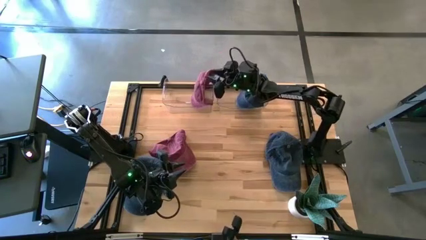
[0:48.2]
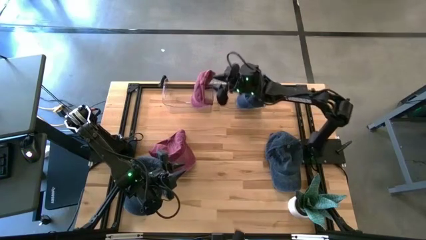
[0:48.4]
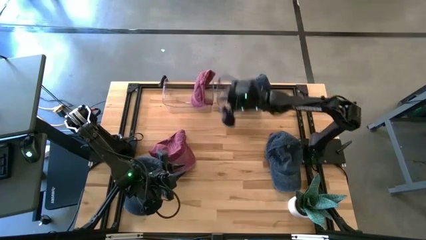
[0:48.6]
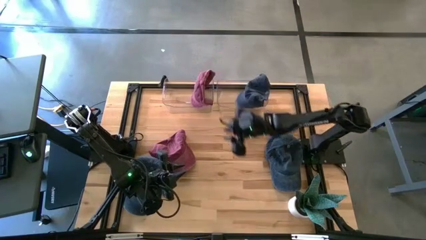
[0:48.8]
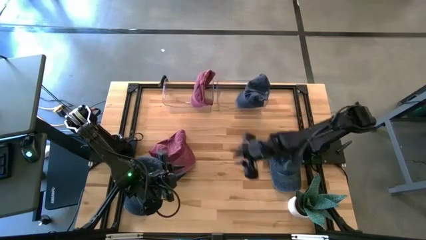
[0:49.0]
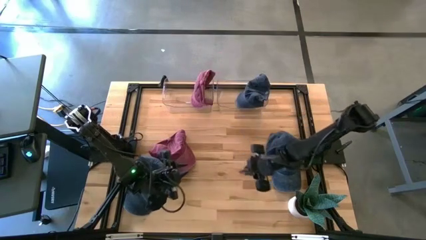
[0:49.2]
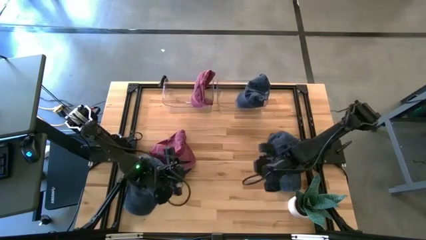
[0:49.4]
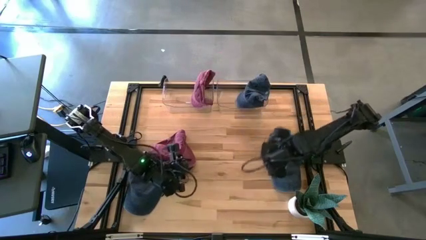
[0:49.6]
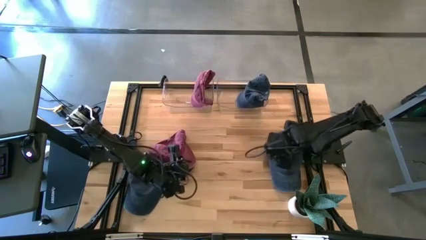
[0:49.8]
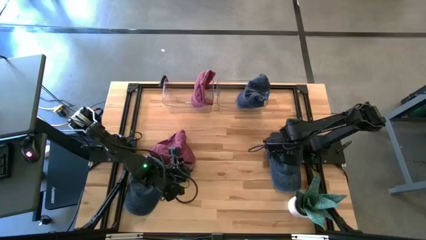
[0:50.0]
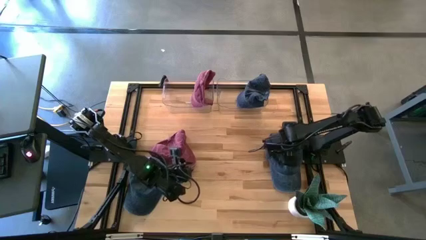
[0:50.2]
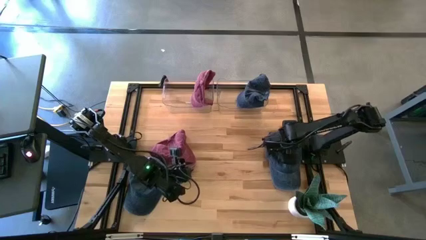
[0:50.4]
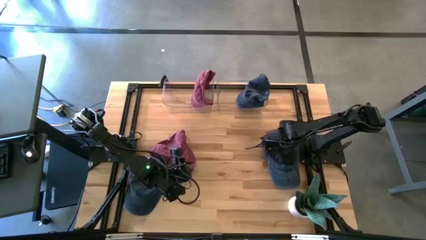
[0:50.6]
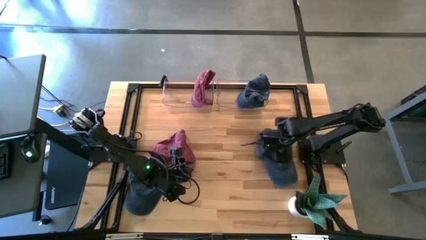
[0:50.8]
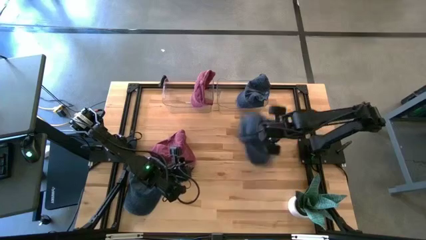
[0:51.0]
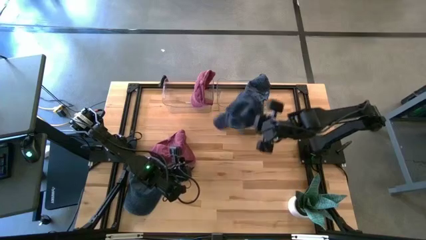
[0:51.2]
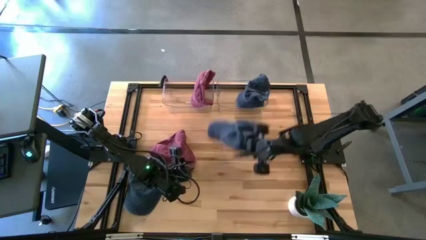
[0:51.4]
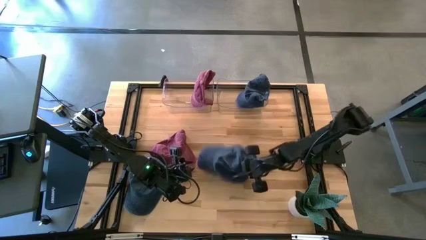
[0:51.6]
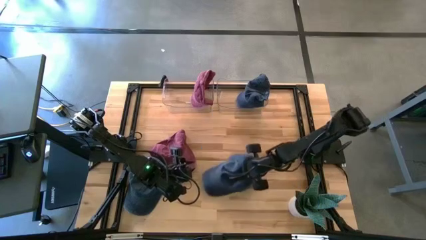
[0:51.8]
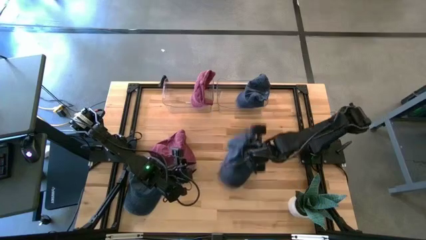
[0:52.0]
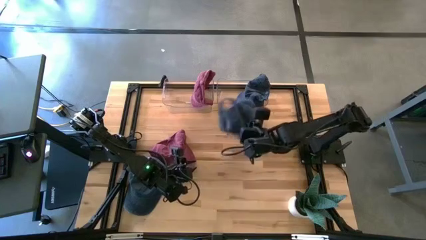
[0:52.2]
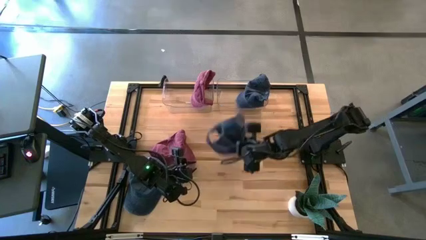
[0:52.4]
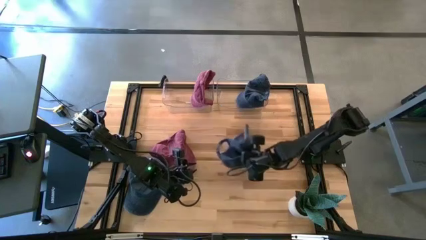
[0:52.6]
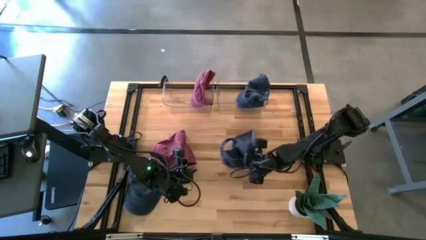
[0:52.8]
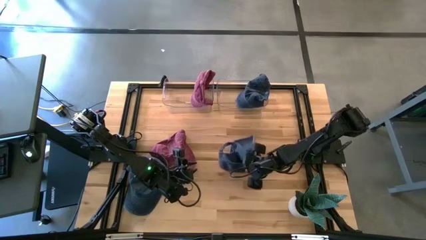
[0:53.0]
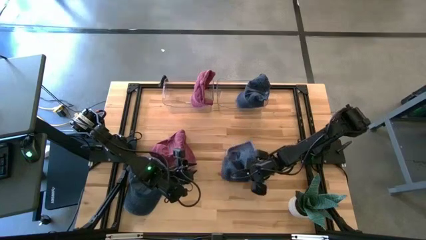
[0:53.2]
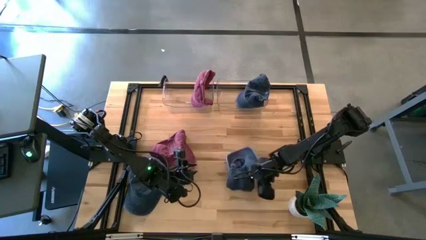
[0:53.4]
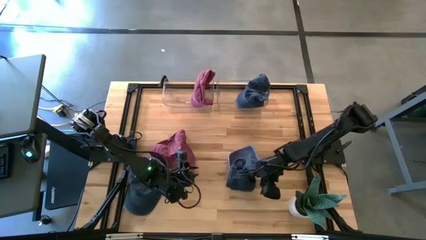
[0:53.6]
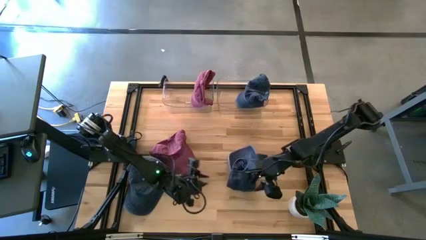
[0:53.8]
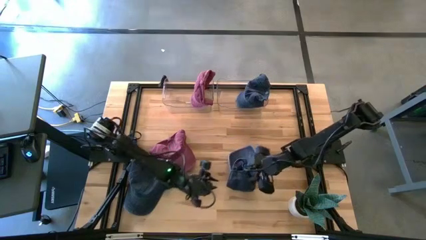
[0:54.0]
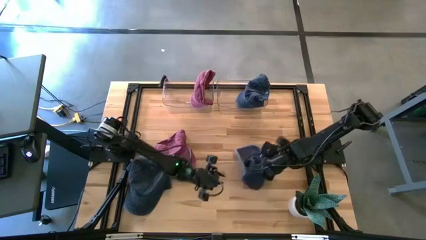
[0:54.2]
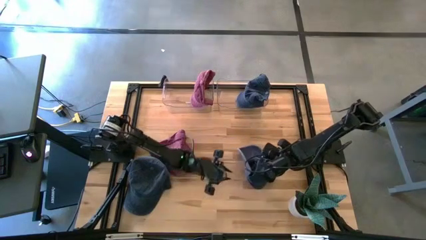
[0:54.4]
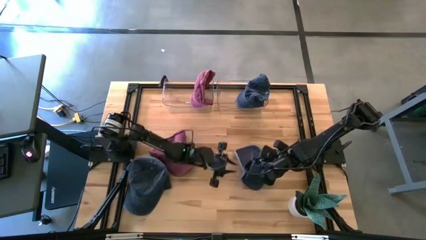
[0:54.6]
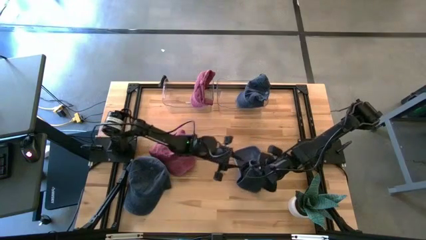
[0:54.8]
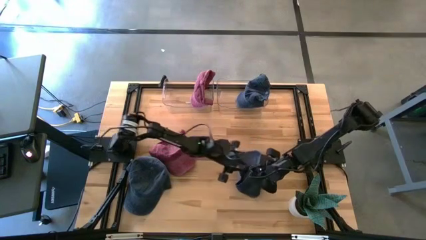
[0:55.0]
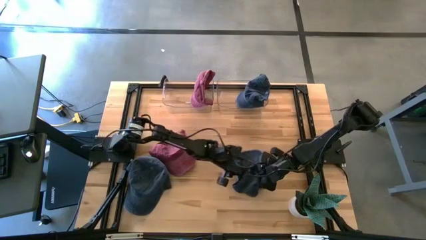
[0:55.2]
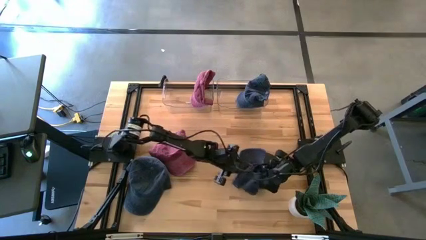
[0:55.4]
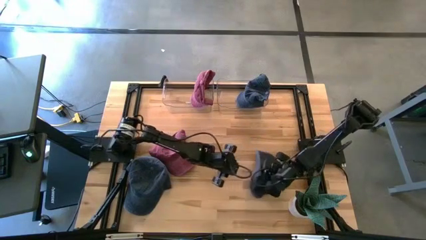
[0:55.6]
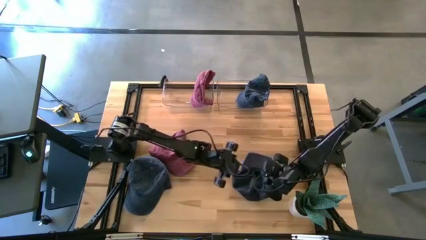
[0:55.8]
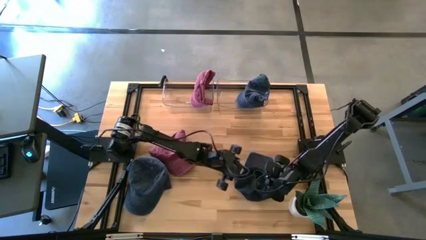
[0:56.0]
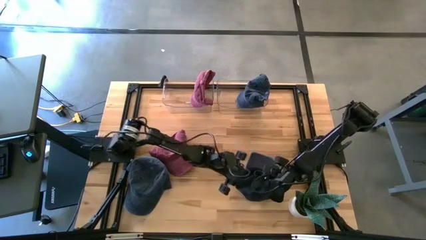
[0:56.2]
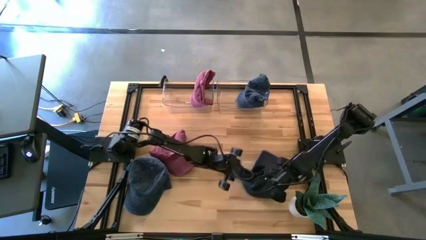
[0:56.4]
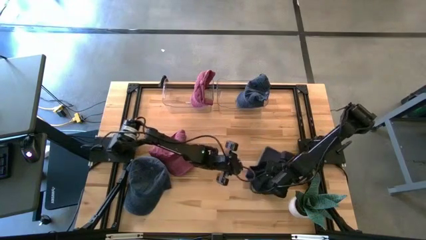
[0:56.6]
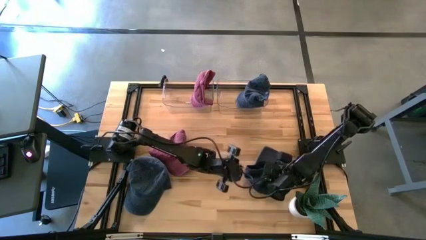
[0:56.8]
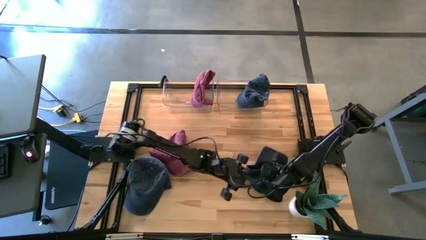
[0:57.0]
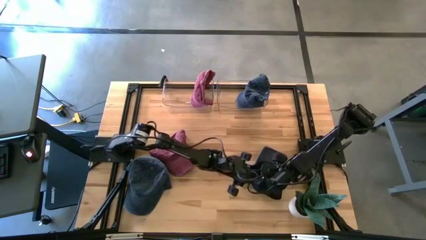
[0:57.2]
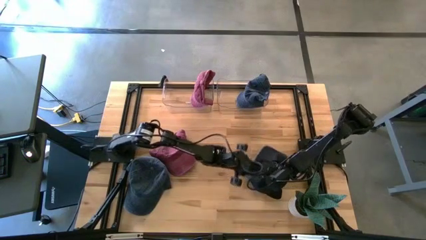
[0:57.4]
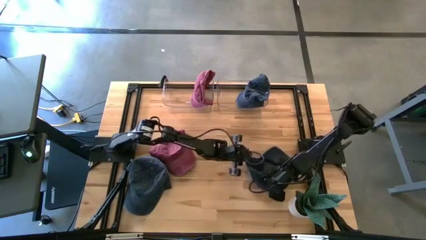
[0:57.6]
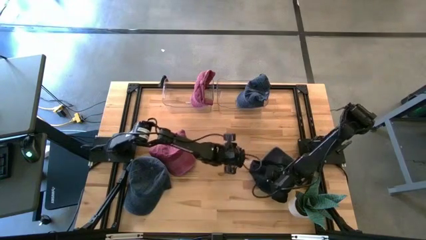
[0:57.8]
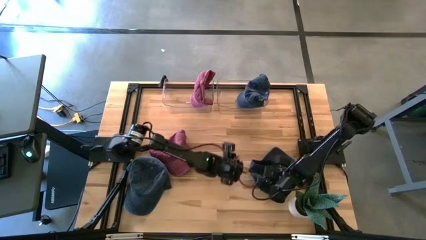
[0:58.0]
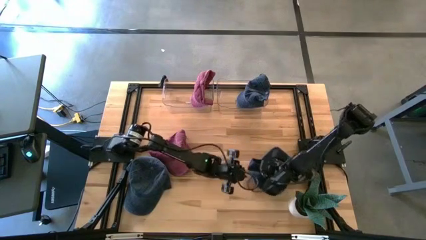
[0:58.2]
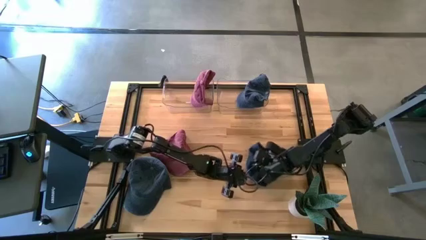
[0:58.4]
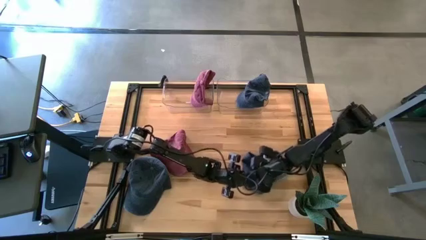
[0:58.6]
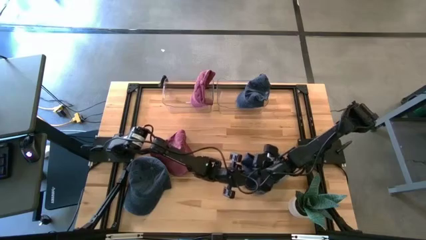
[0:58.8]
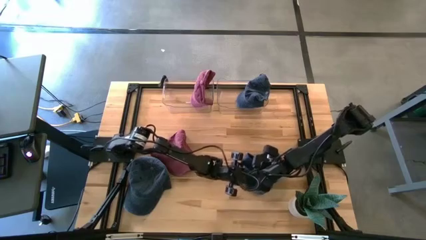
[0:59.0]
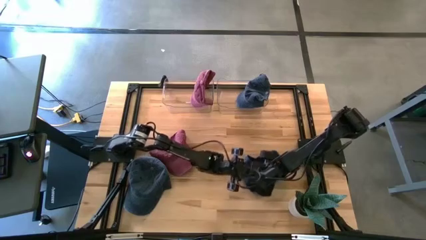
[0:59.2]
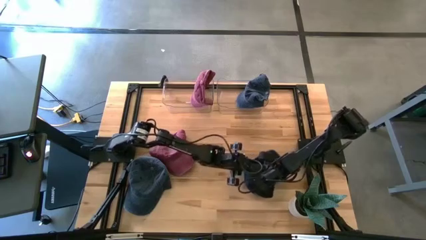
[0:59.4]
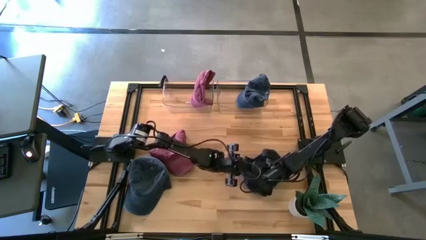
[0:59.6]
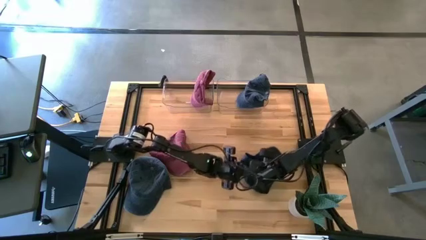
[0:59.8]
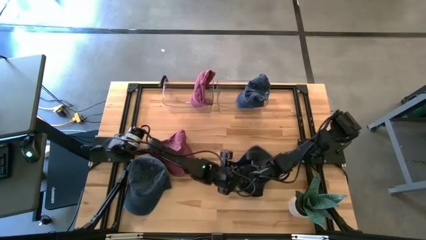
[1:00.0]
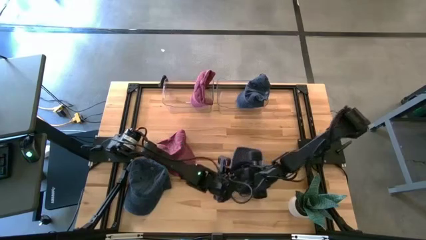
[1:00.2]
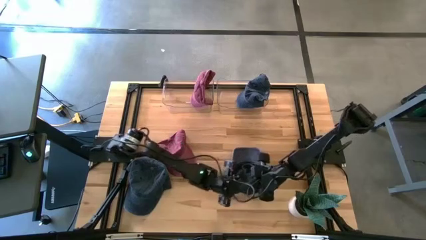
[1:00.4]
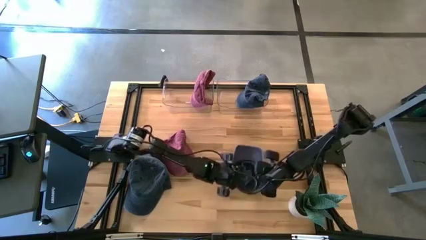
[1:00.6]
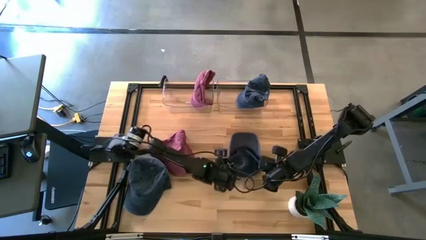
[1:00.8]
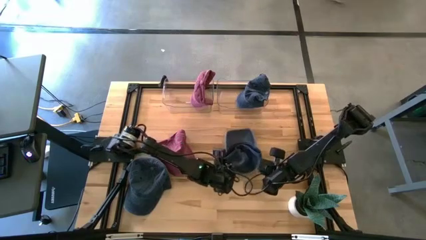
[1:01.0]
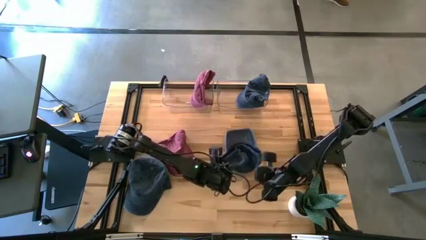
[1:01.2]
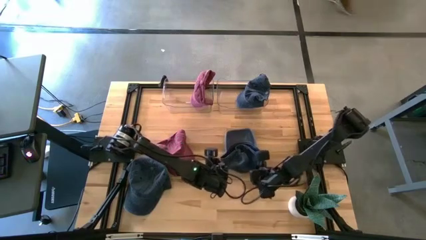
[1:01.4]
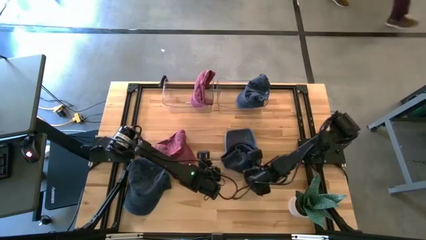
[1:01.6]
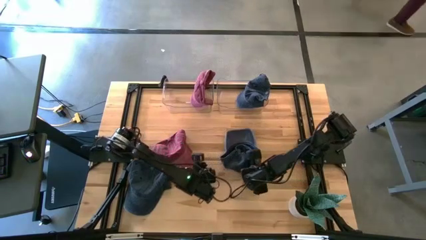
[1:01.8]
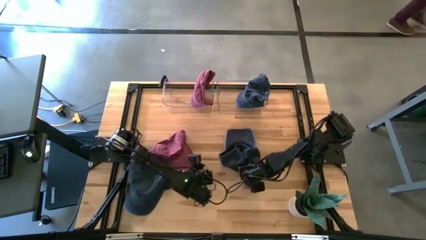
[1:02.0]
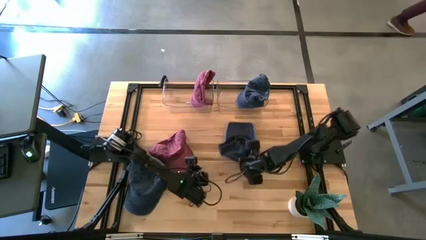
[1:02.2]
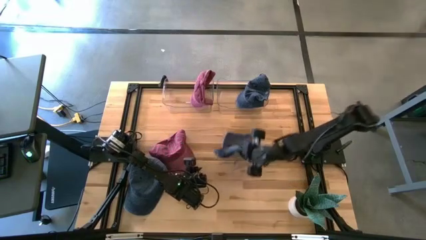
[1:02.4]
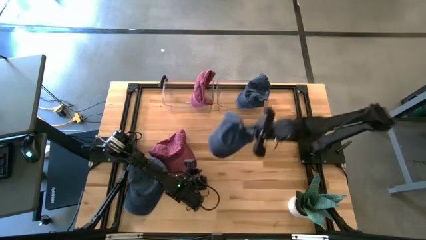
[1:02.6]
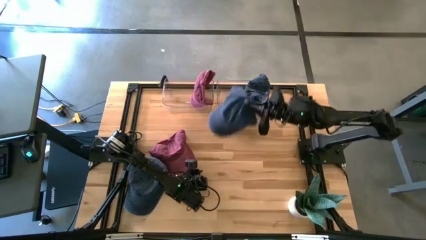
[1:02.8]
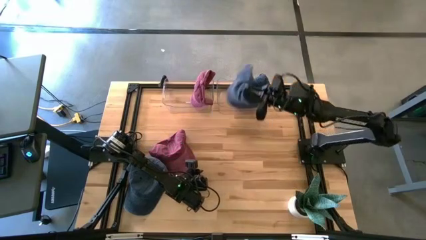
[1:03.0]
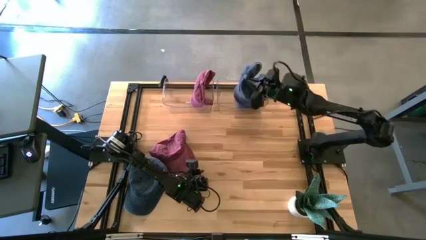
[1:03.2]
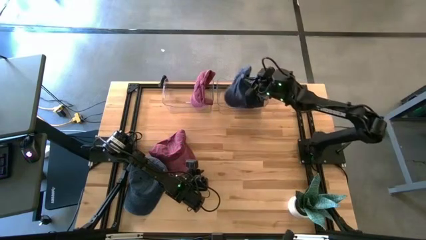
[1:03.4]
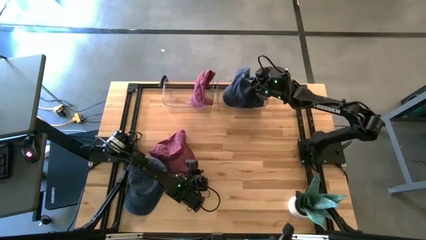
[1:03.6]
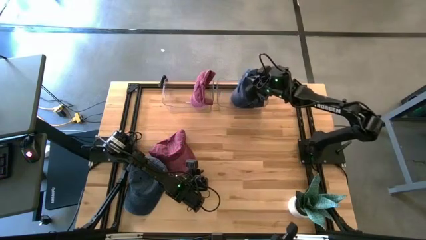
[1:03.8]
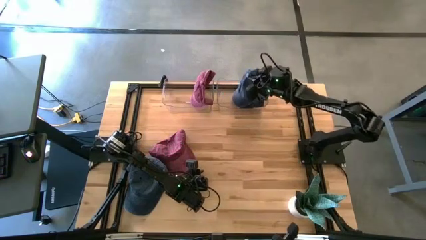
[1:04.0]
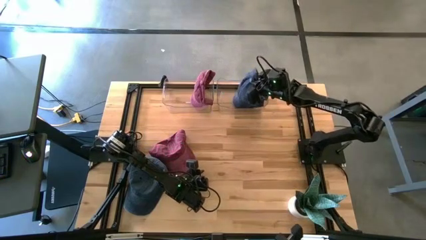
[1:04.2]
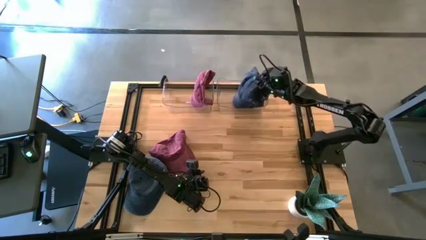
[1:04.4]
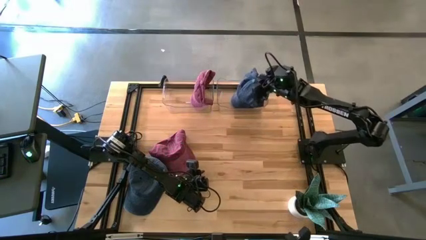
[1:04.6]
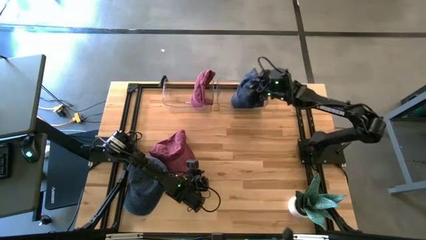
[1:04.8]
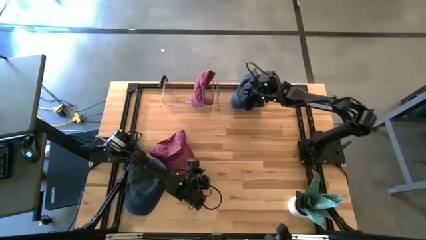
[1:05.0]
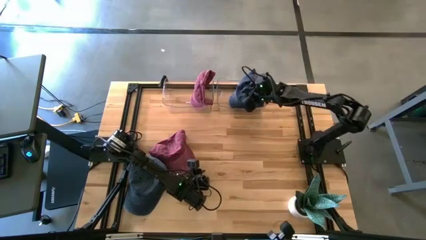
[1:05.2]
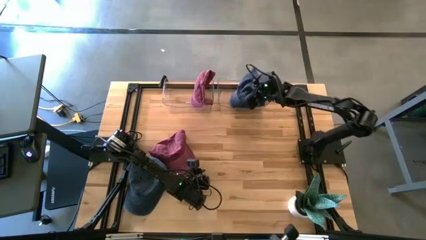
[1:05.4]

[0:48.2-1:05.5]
Task: Pick & Place hat
Put the right blue cap into the right transparent bin
